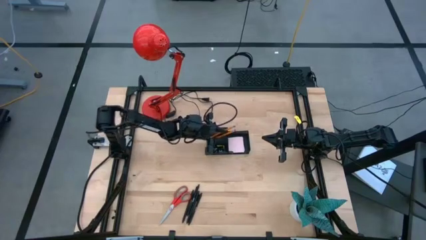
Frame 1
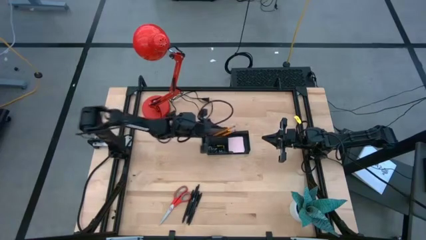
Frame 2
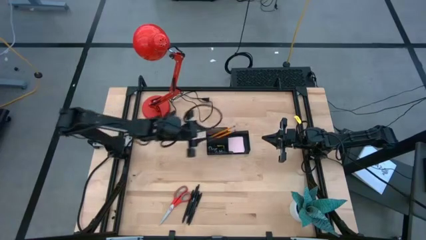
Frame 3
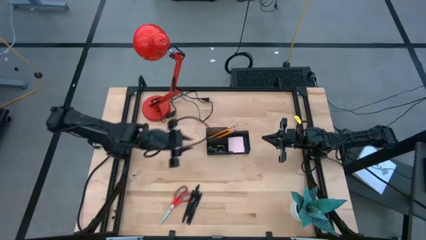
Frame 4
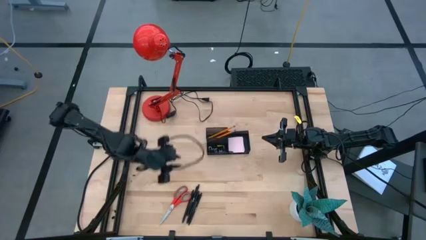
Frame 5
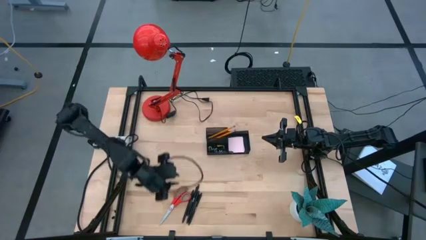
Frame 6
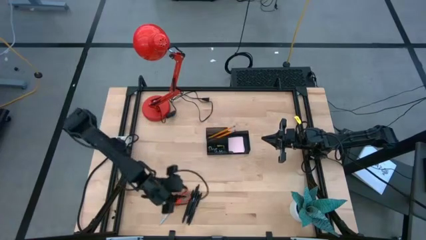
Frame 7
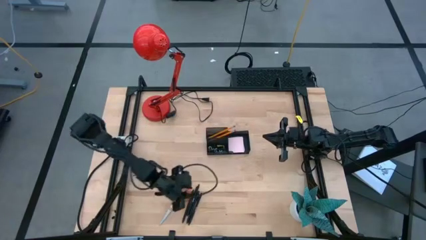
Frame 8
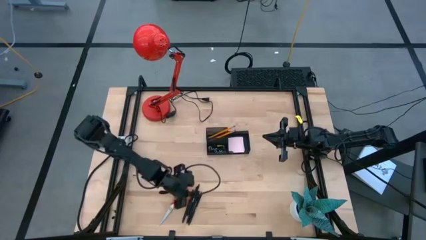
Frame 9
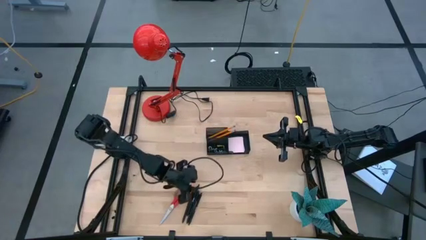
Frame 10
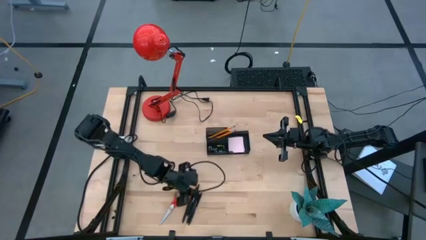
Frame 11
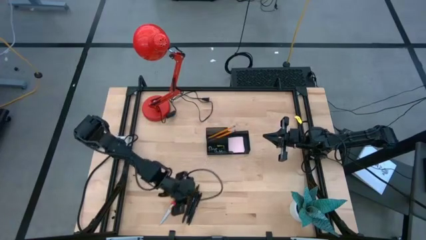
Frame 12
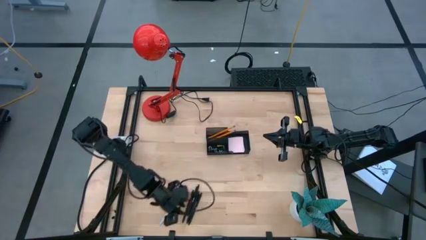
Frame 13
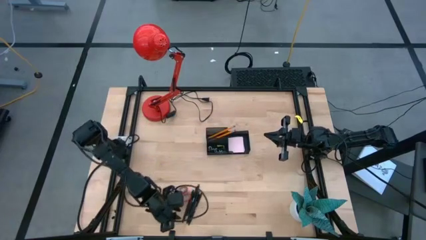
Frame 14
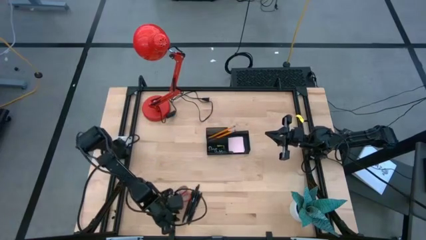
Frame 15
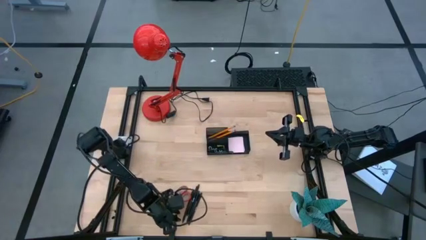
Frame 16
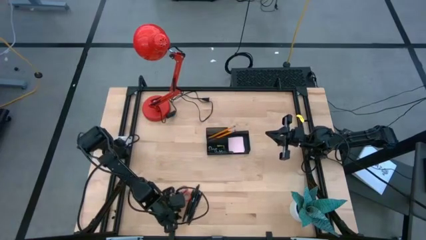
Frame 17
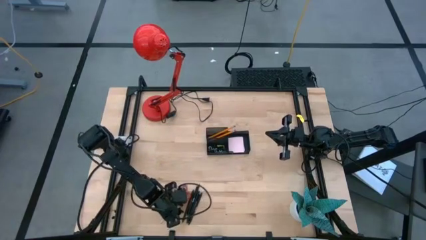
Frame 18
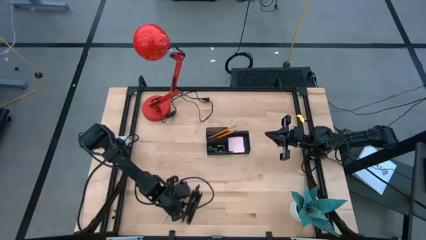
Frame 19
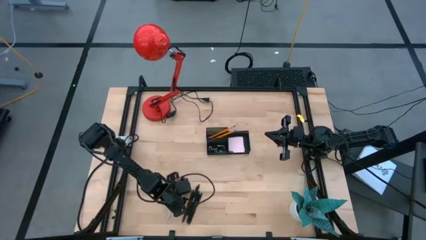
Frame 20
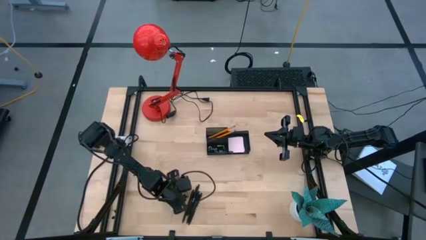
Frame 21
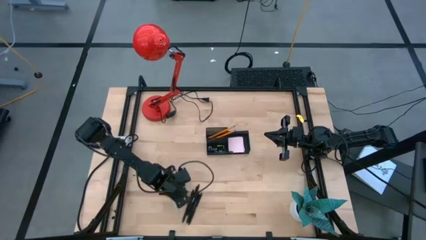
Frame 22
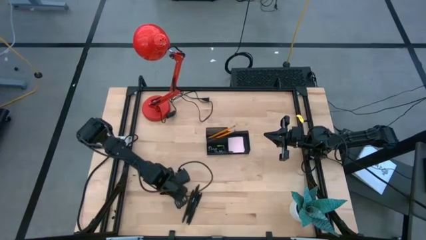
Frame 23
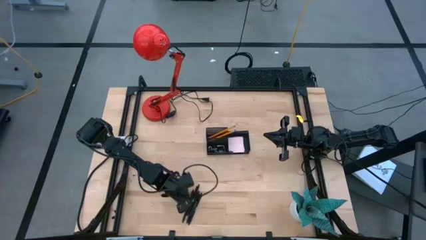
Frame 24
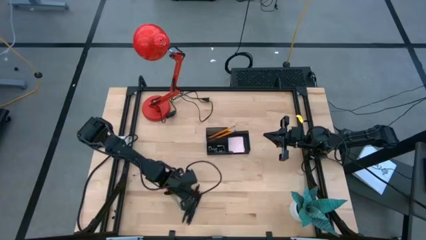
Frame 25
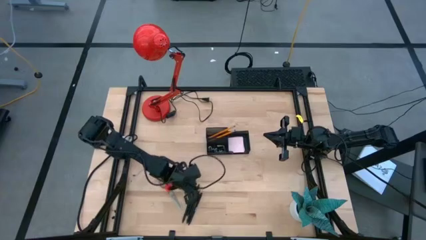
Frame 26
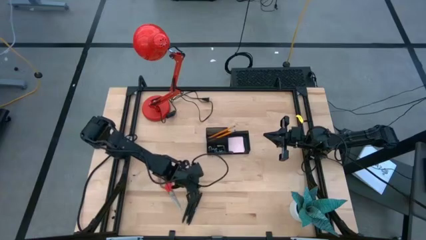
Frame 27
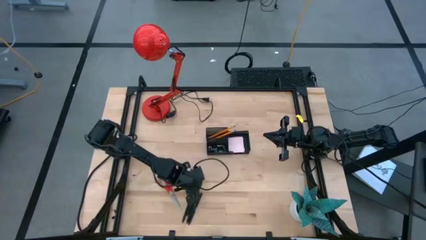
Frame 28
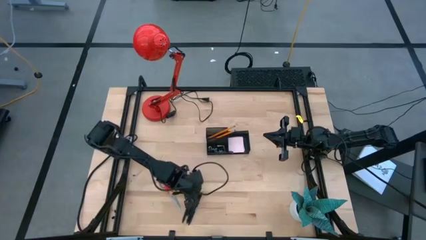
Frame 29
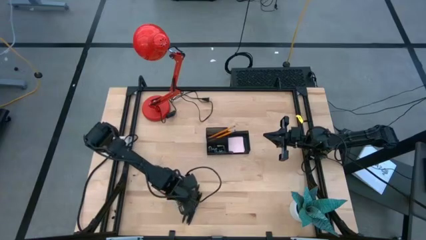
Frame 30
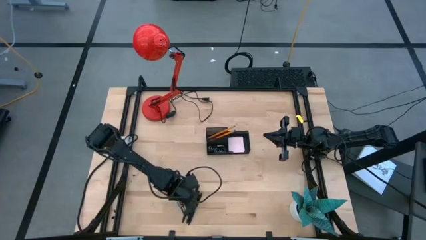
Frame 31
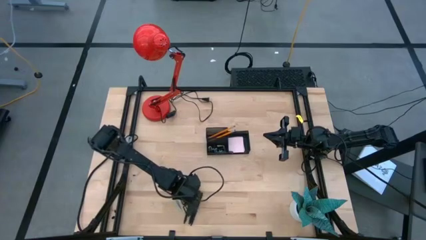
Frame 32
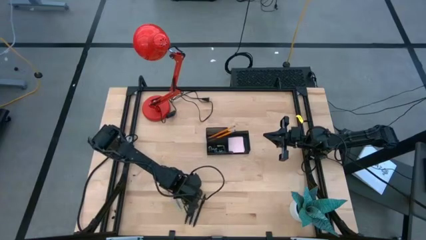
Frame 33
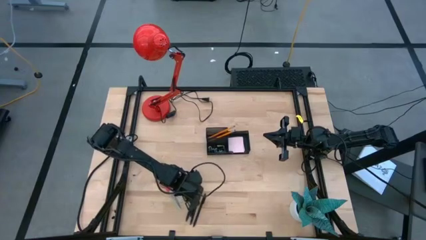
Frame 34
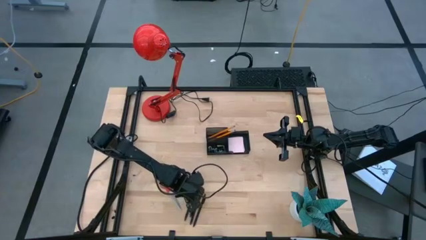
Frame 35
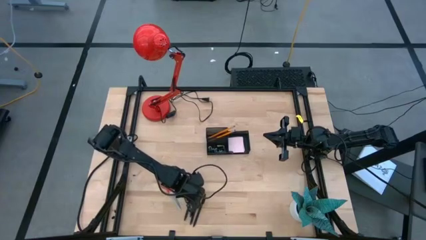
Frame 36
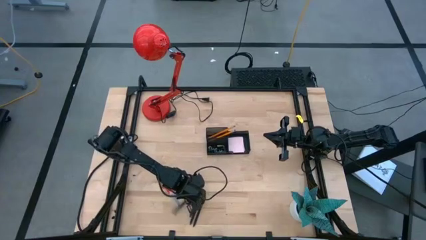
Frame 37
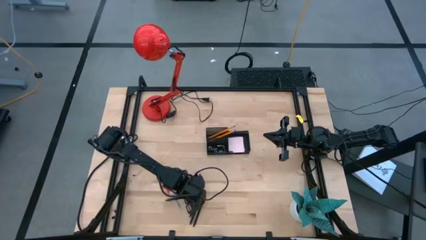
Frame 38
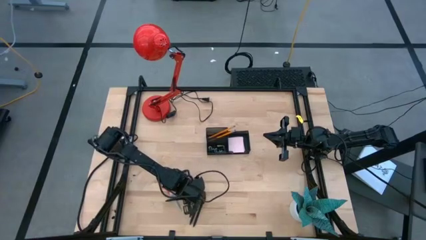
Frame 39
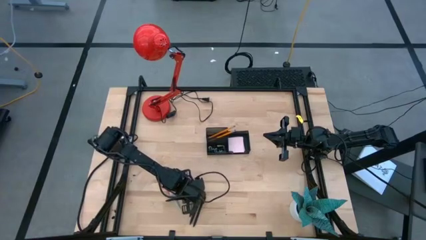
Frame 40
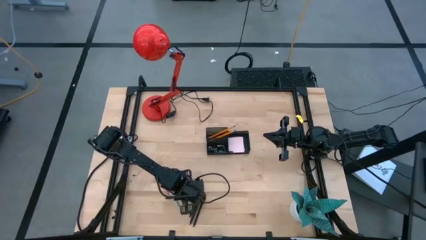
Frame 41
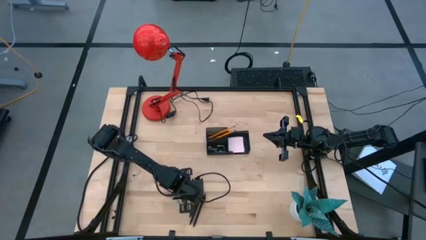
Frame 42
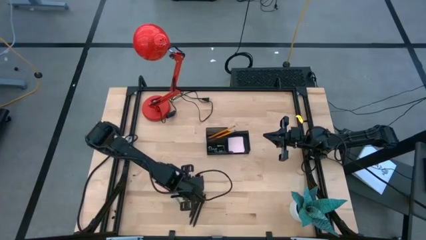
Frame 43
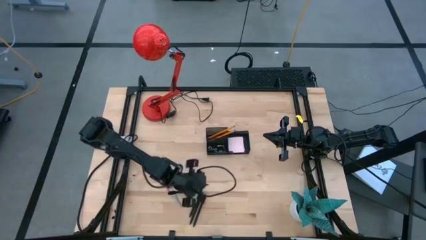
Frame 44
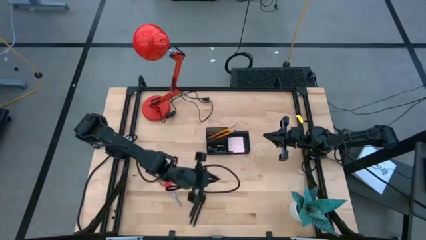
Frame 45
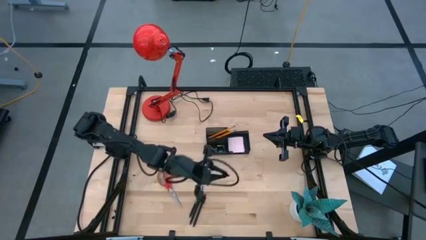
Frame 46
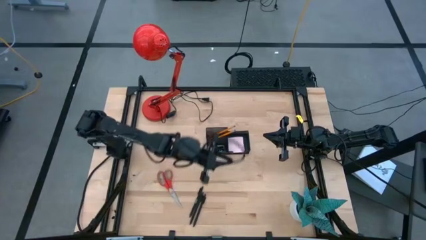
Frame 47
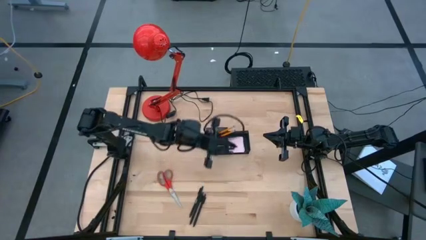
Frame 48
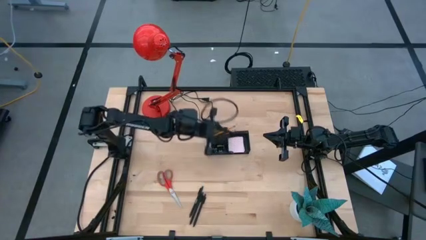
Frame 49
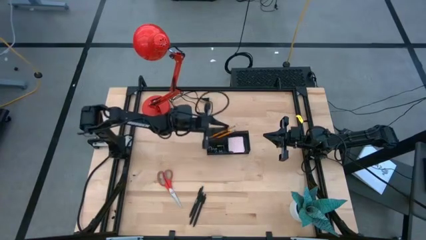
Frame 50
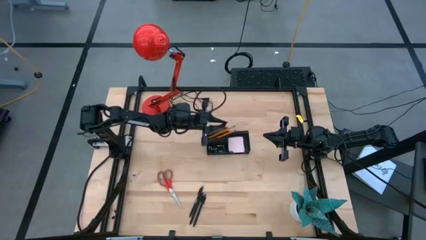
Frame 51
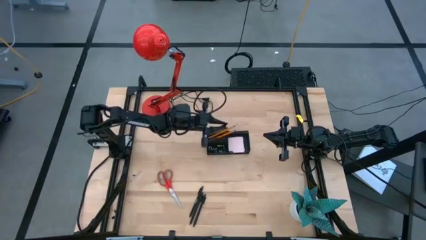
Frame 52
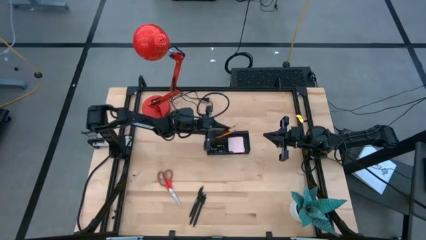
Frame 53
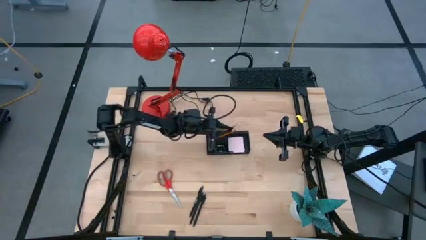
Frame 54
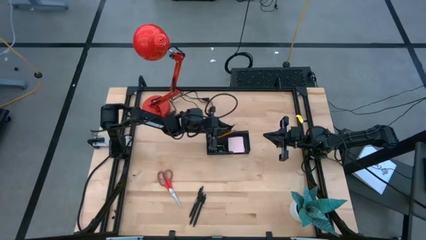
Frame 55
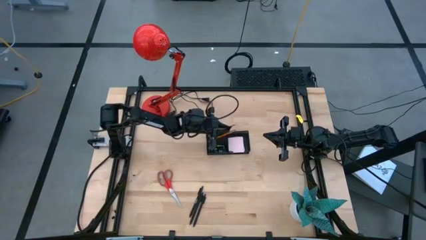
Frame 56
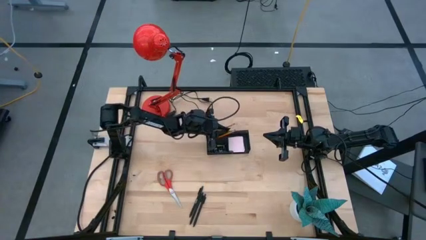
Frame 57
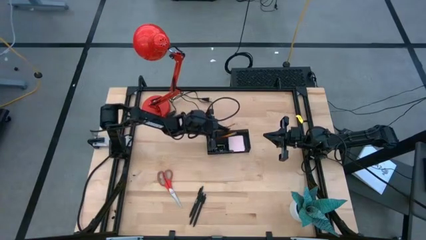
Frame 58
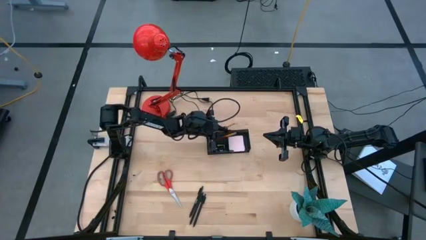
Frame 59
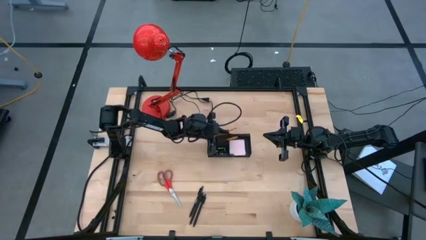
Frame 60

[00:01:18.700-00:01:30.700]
Task: Pick and place office supplies into organizer
Put the black pen into the black desk organizer
